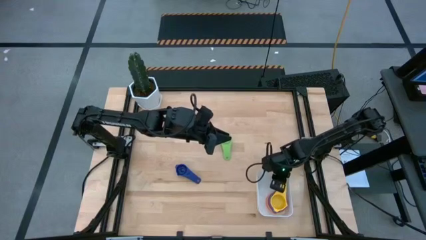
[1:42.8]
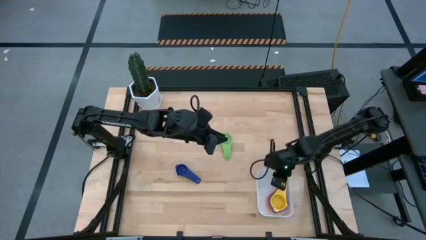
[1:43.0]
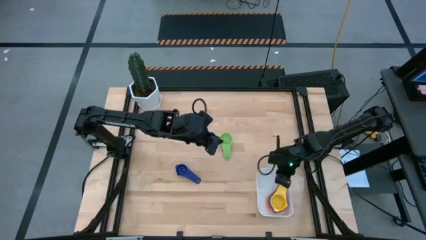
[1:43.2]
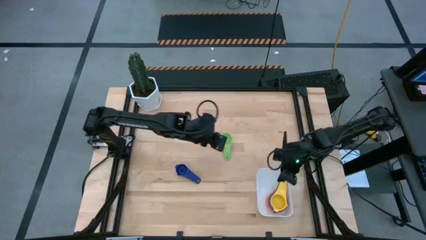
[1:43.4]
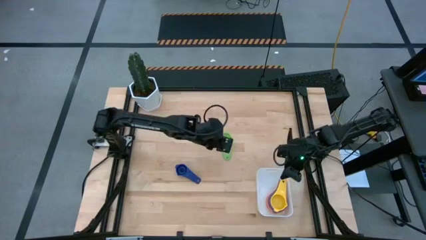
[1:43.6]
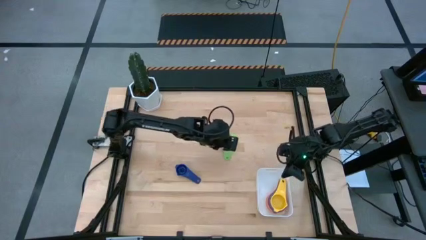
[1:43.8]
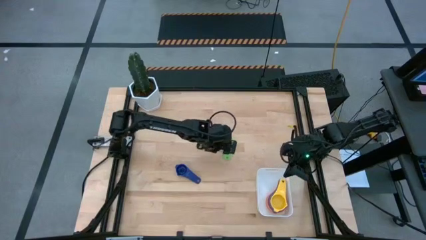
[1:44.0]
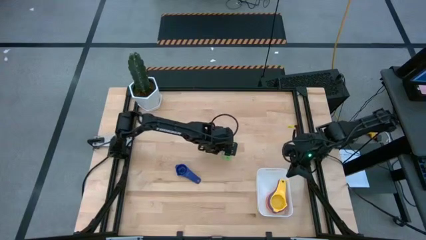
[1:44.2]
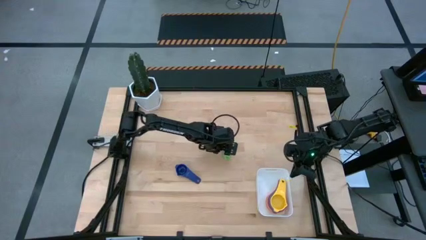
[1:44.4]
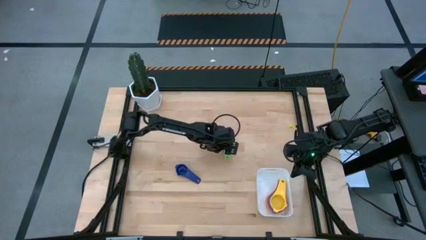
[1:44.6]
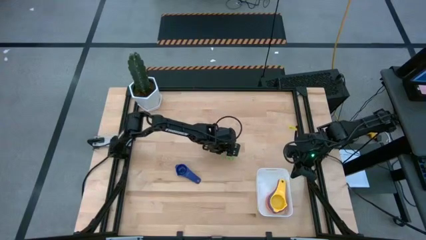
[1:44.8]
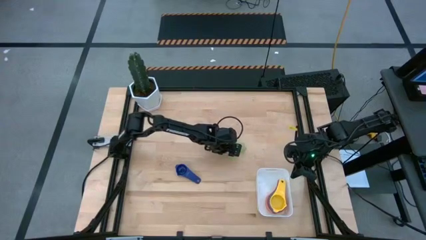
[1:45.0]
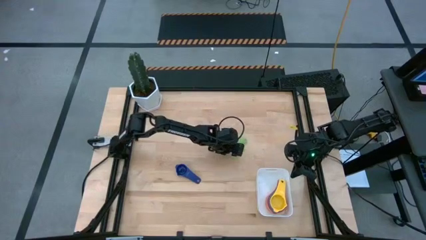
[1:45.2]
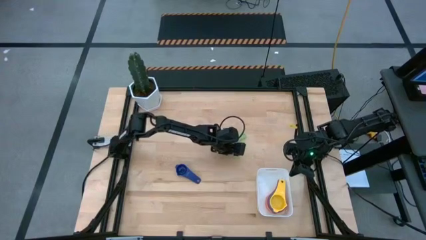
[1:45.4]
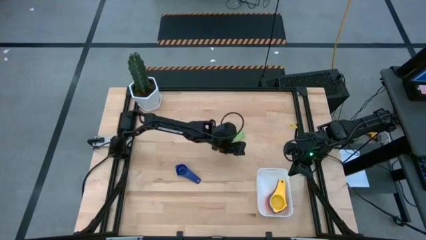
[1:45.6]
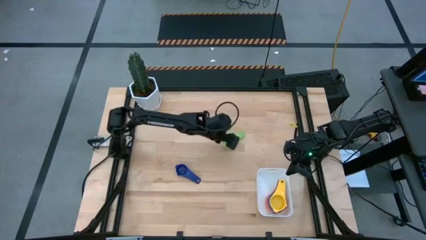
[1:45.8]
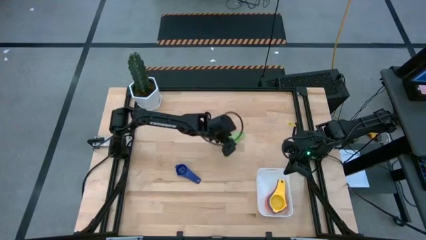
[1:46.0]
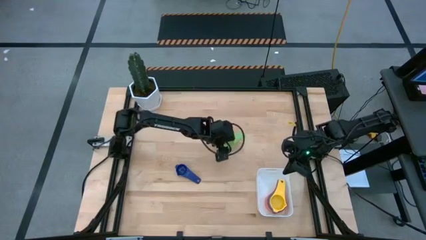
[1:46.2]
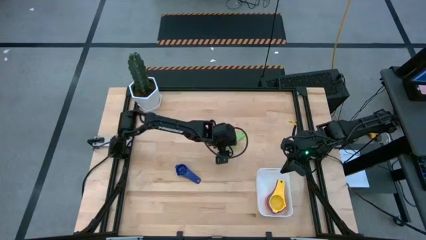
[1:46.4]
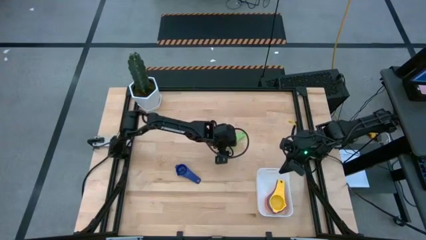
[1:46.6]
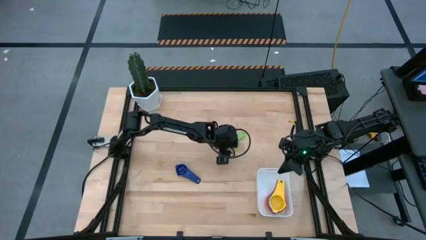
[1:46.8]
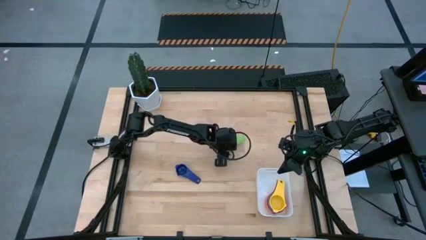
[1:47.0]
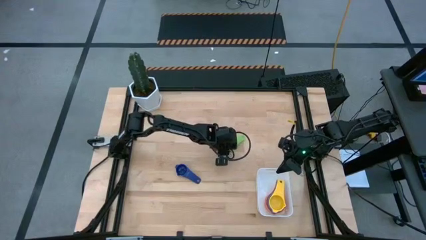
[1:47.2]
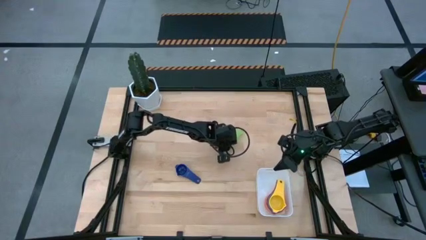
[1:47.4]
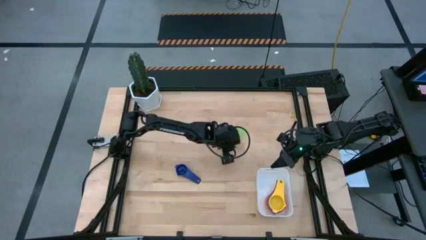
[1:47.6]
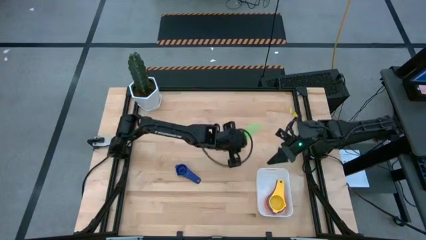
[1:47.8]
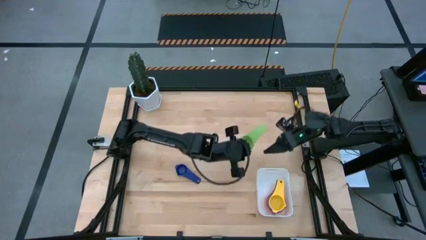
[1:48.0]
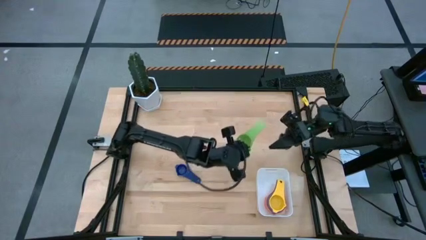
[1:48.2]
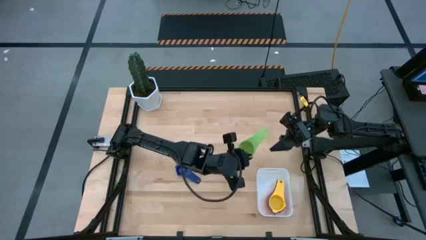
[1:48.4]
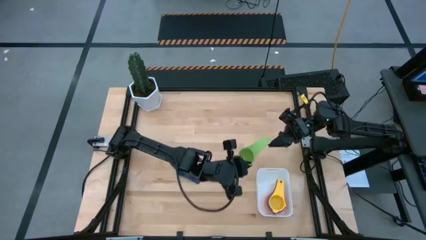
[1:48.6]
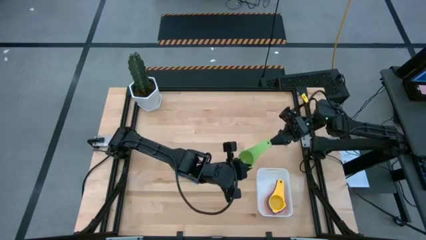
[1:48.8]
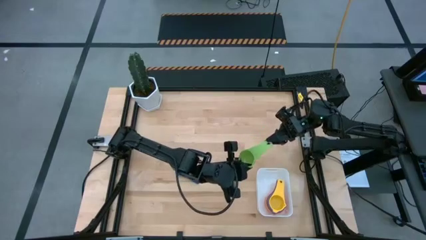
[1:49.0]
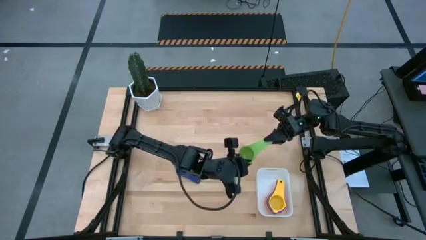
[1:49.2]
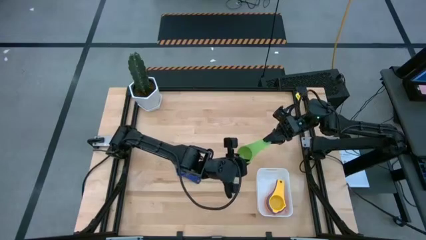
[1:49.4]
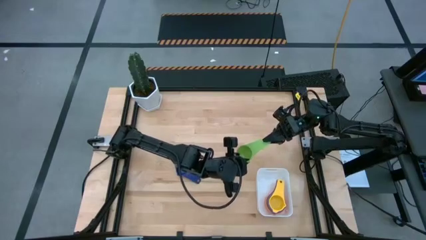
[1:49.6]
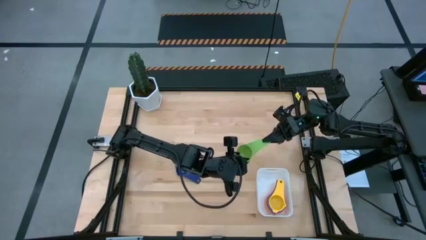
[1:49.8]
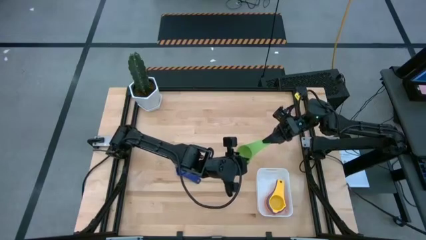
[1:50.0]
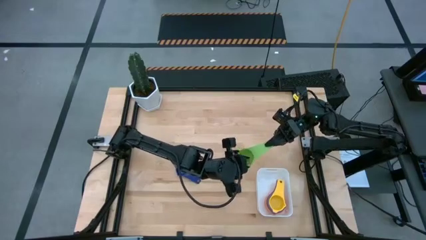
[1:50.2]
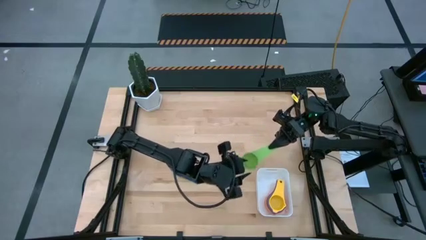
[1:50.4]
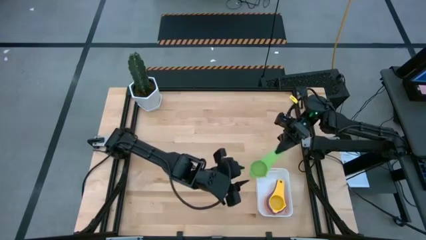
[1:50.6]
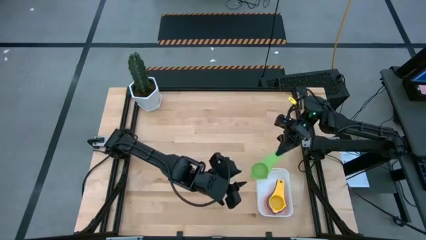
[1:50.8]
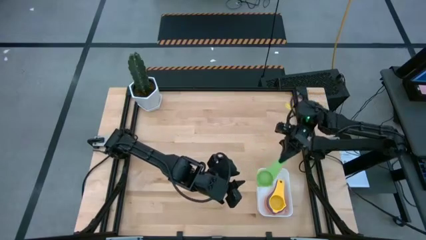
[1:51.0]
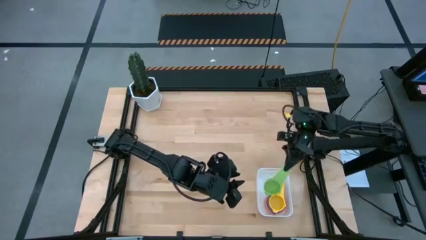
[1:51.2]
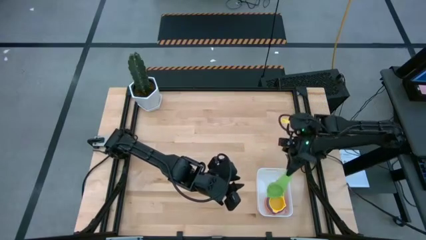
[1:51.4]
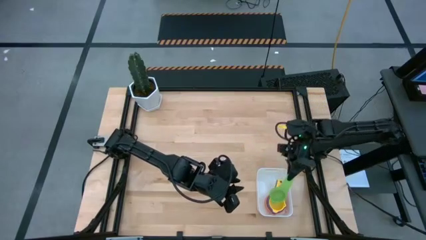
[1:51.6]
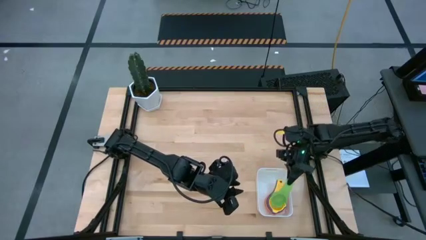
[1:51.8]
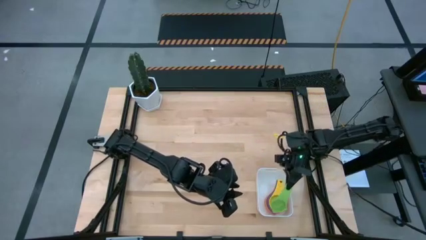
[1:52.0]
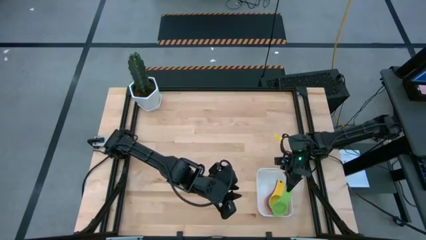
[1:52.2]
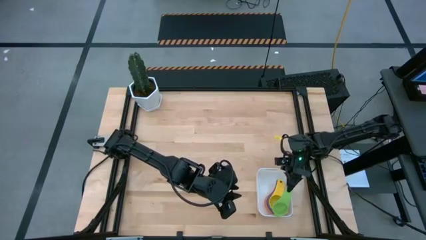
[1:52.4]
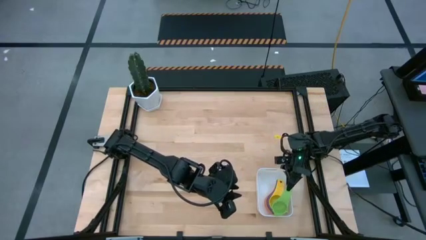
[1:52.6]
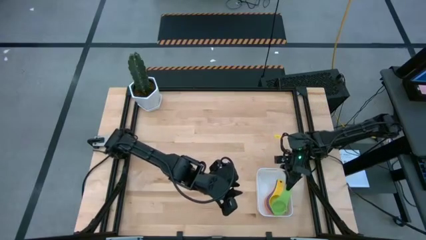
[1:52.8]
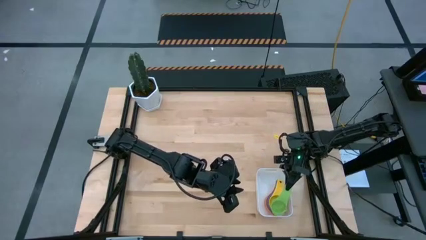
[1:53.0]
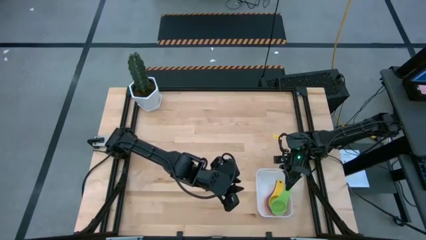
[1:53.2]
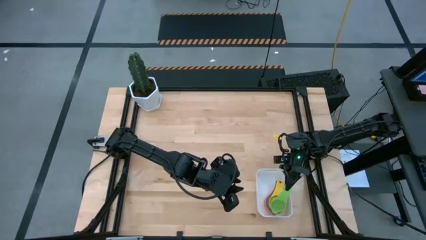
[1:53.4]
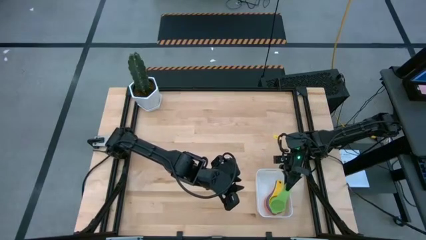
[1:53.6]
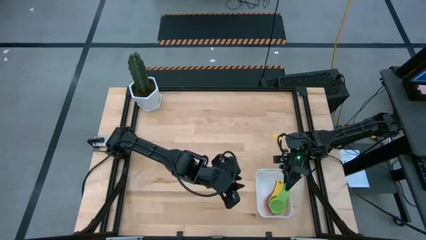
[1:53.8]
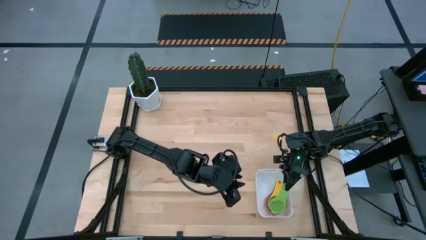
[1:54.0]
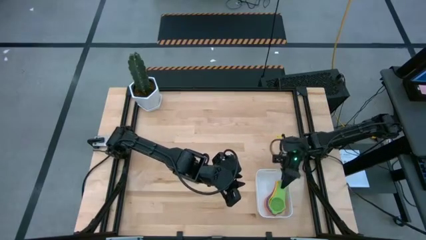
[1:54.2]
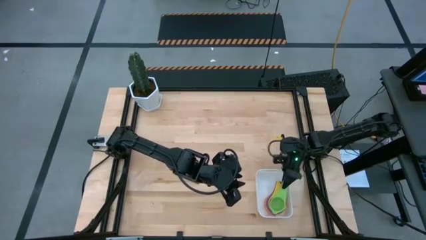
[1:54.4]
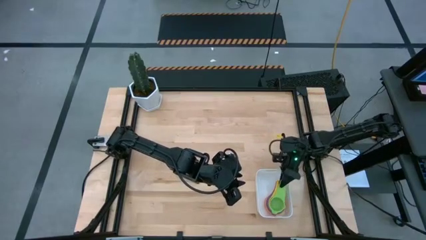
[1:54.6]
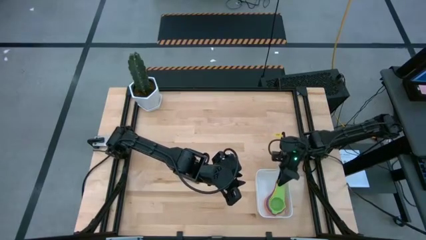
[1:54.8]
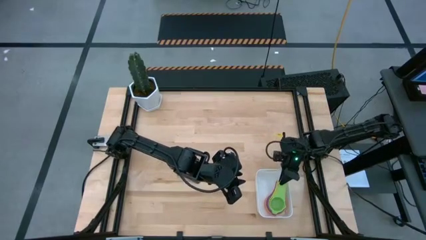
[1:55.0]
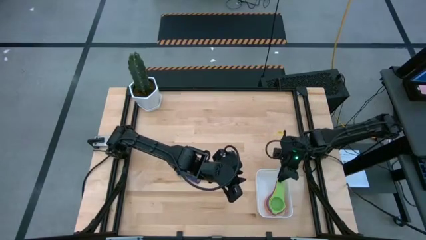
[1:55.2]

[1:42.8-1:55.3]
Task: Nest measuring cups in basket
Stack the green measuring cup on top of the yellow measuring cup into the white bin
